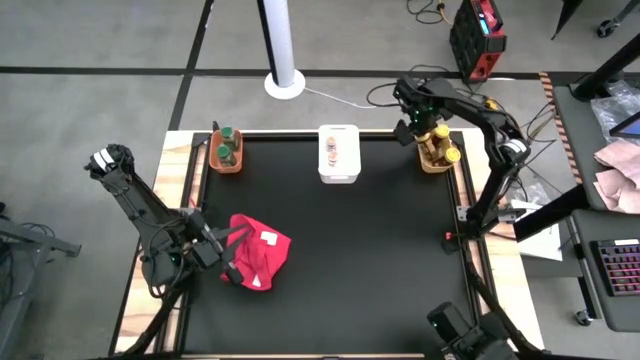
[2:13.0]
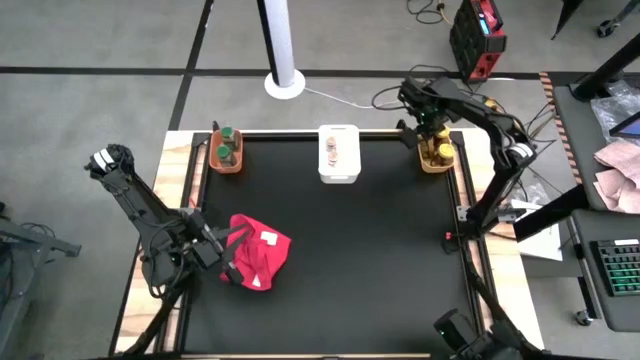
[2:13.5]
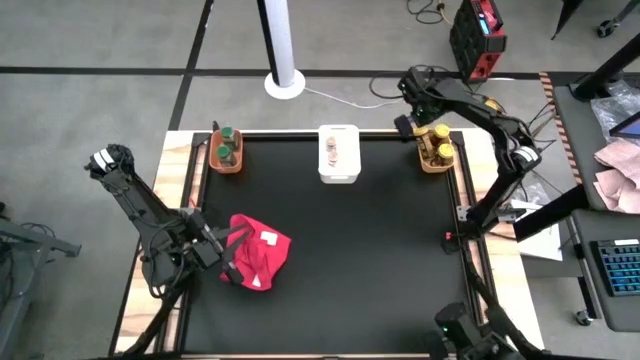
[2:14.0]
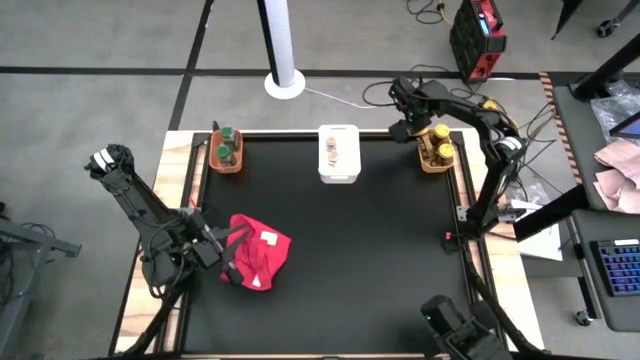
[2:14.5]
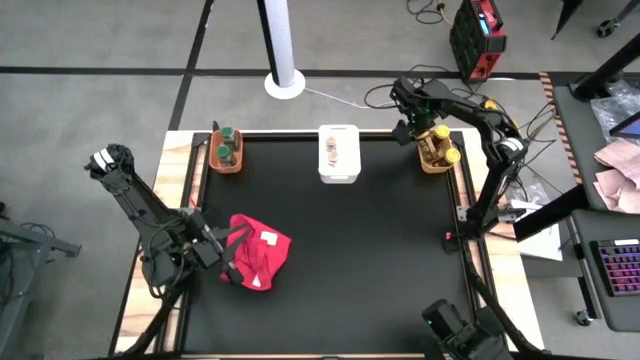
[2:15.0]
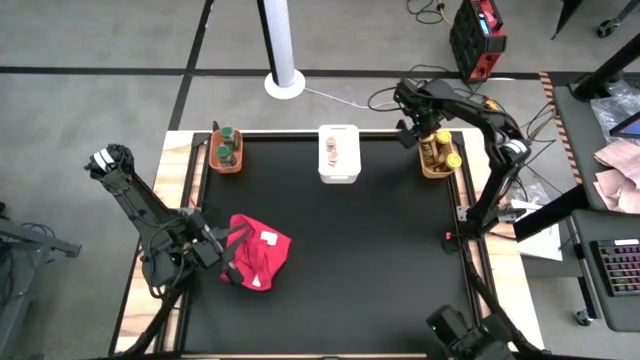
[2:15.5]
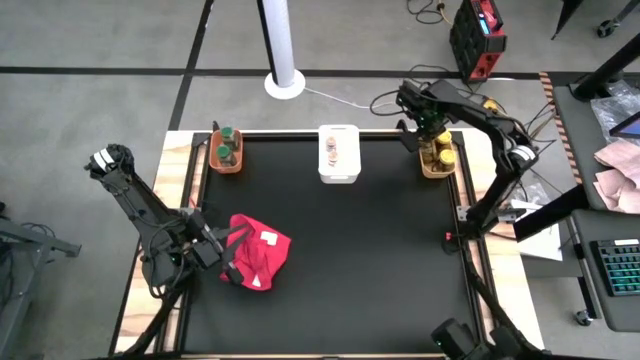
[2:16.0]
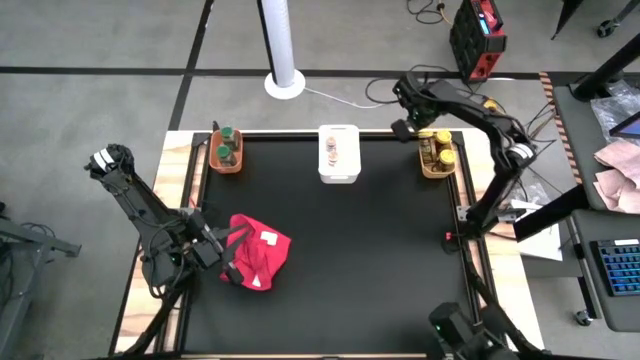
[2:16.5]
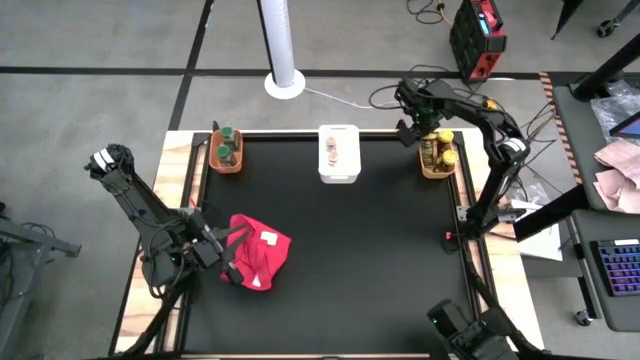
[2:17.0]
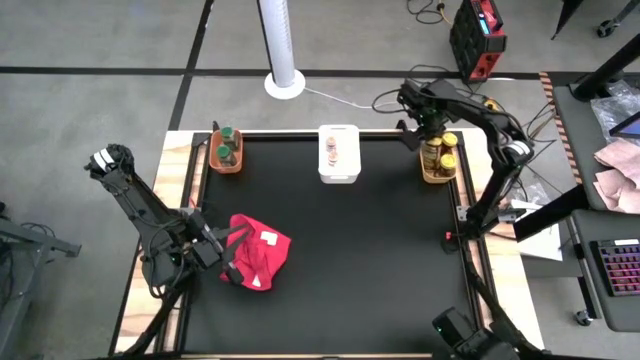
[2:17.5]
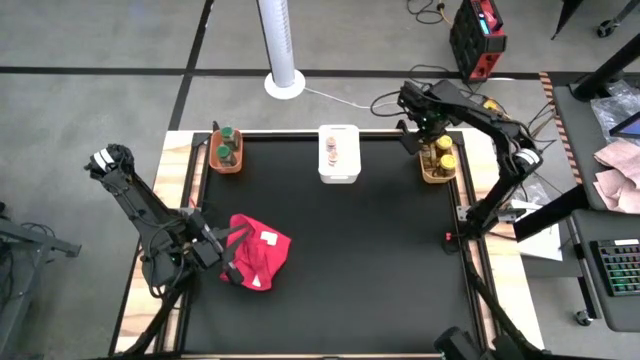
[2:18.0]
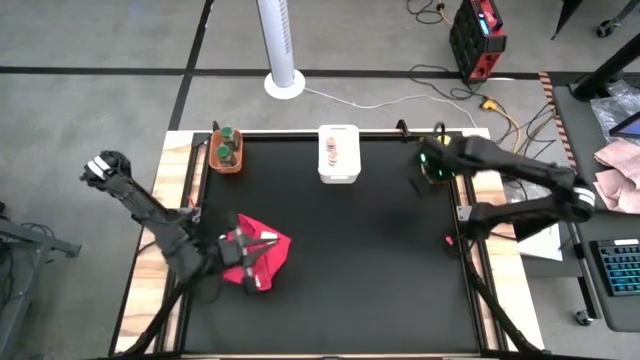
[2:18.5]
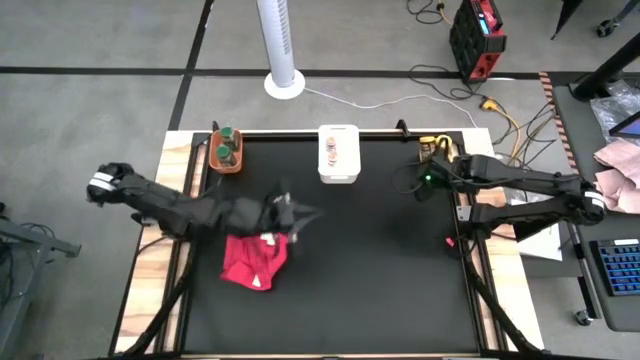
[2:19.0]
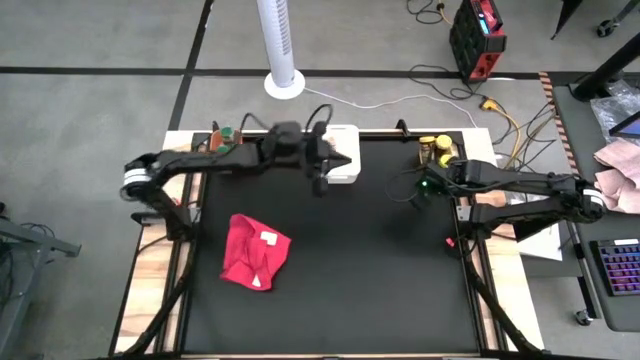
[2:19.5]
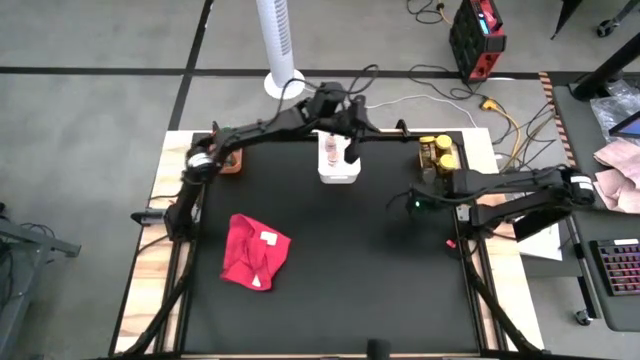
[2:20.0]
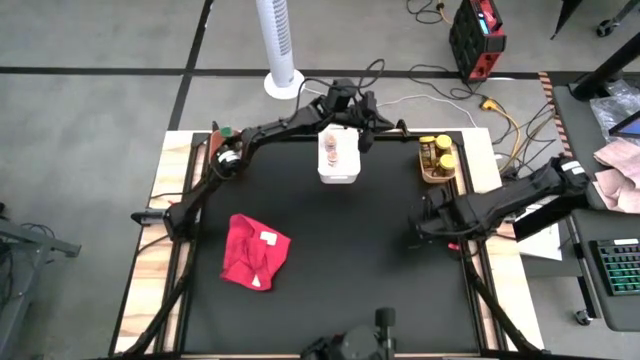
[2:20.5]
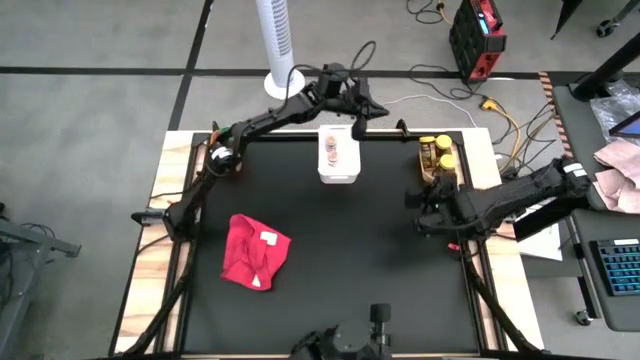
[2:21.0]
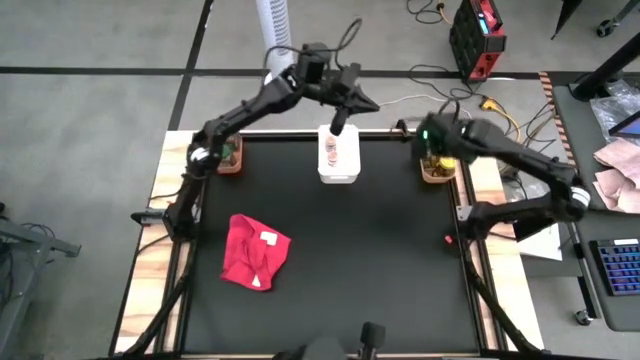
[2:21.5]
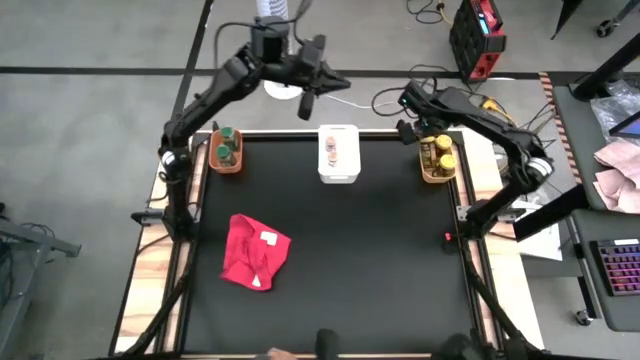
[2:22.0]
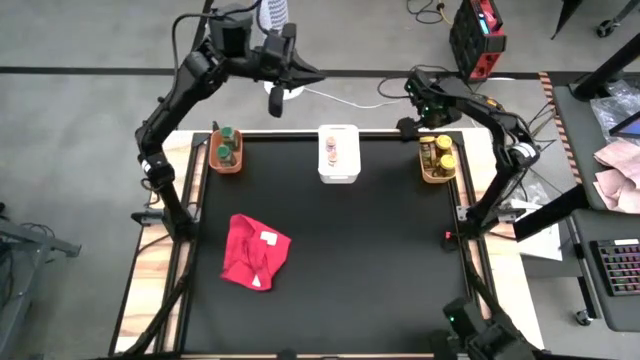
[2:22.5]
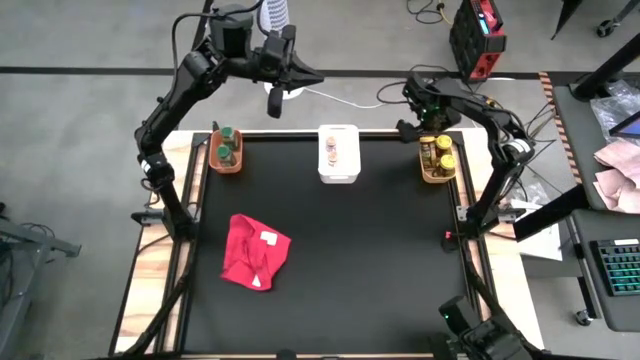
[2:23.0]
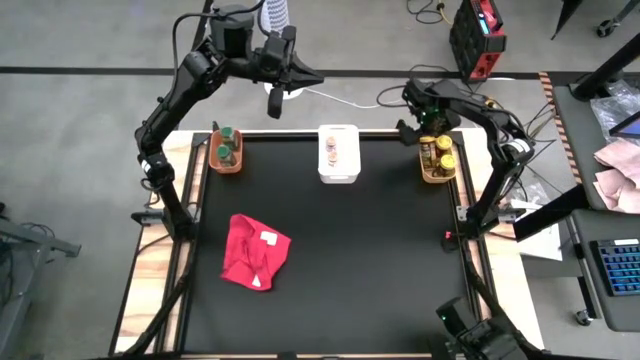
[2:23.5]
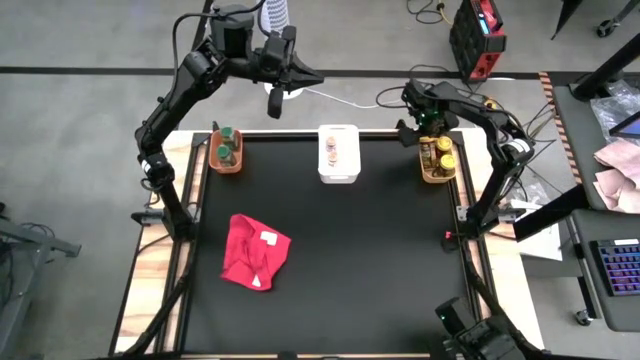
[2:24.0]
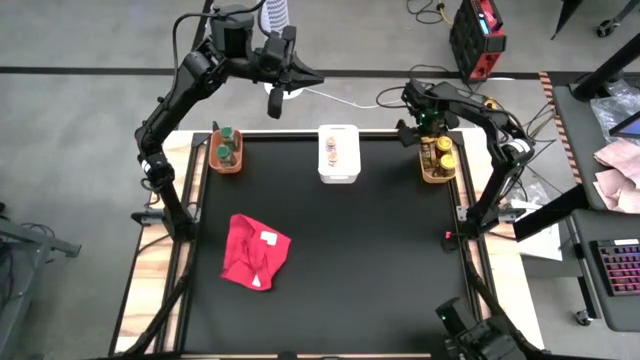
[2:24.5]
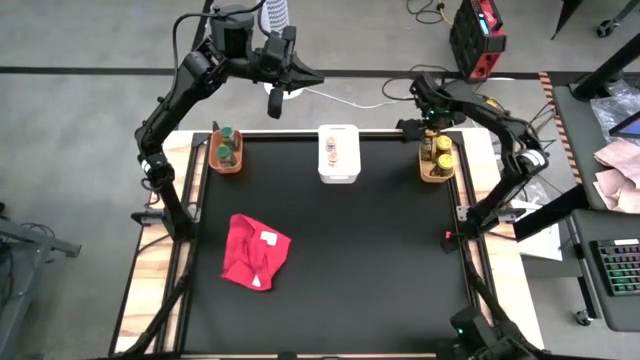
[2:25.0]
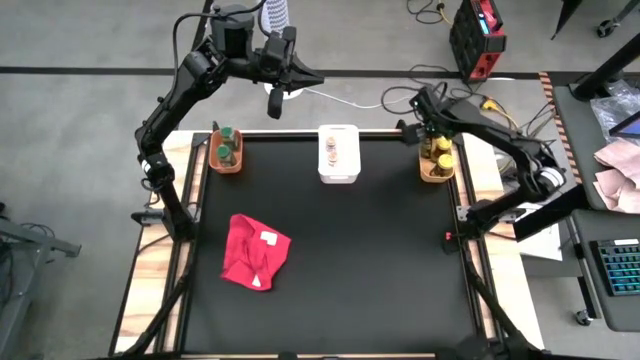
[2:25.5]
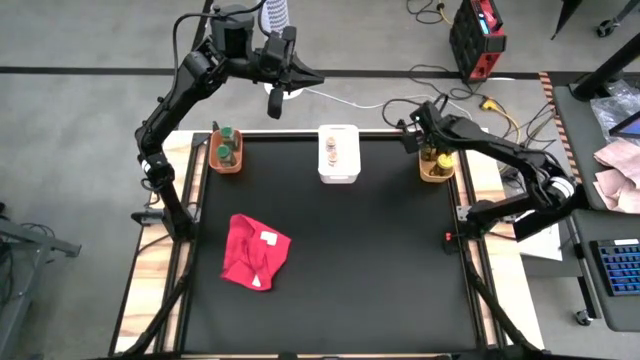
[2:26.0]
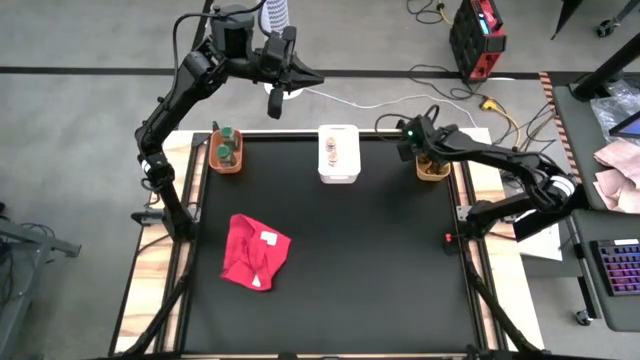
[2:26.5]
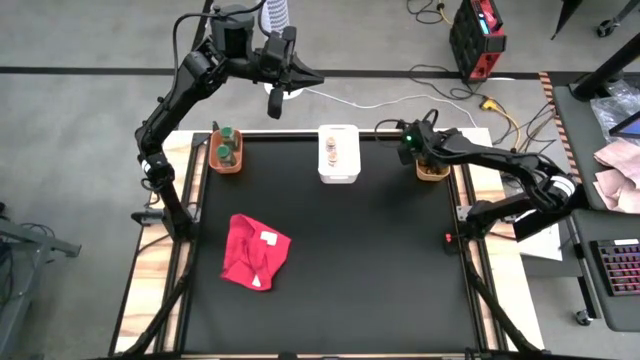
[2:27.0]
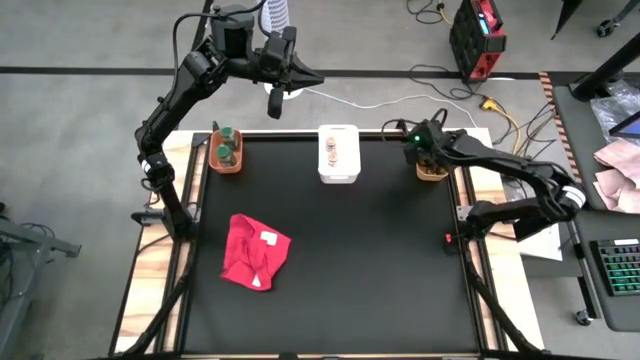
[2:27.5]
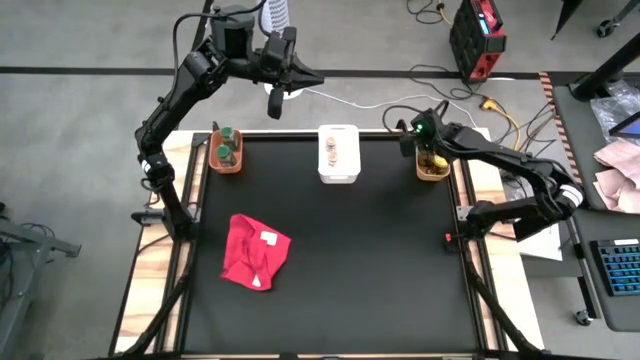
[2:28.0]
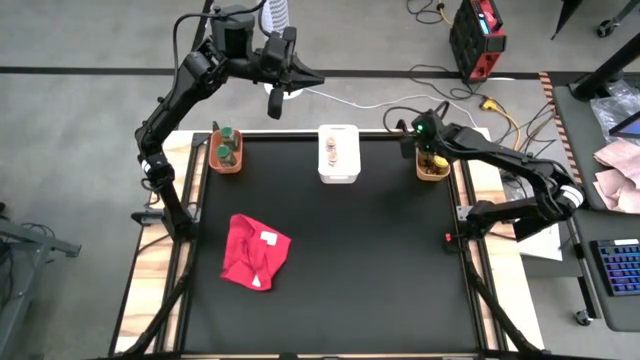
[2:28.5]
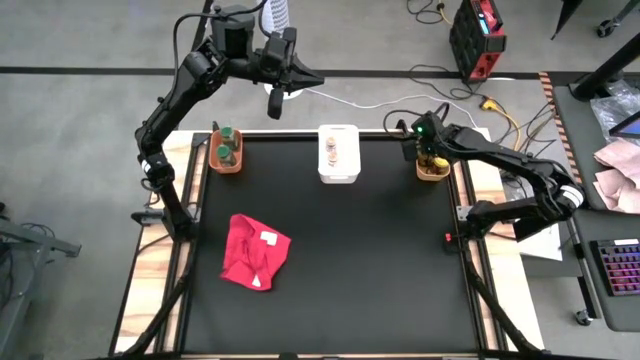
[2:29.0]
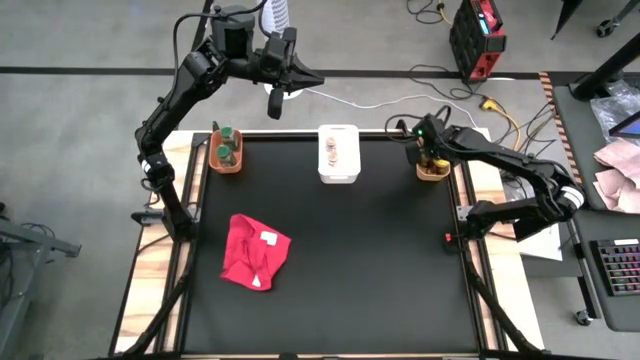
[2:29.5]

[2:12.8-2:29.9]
Task: Sort spices by type
Put the yellow seasoning bottle into the yellow bin

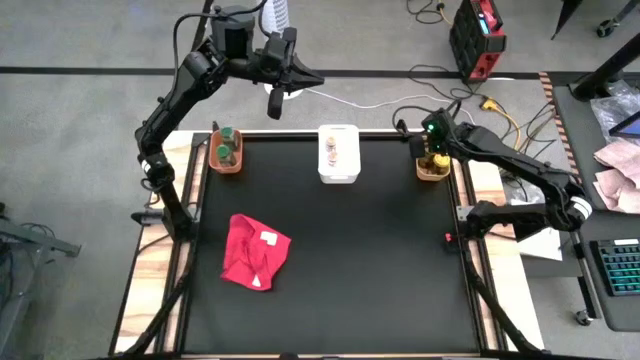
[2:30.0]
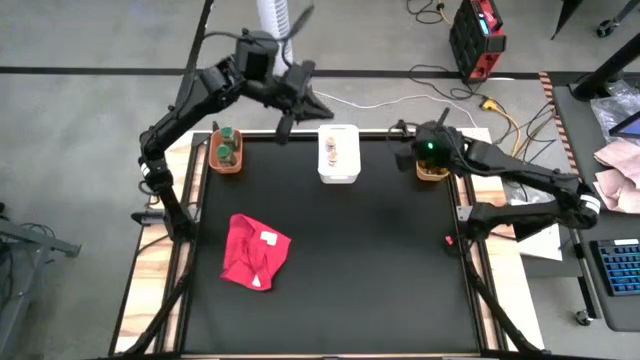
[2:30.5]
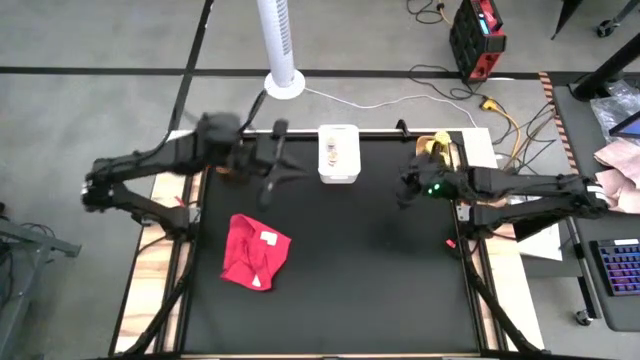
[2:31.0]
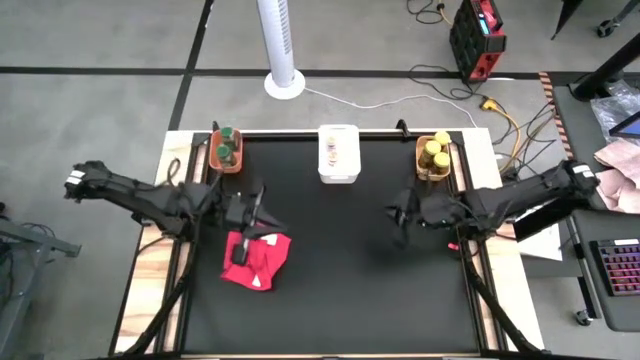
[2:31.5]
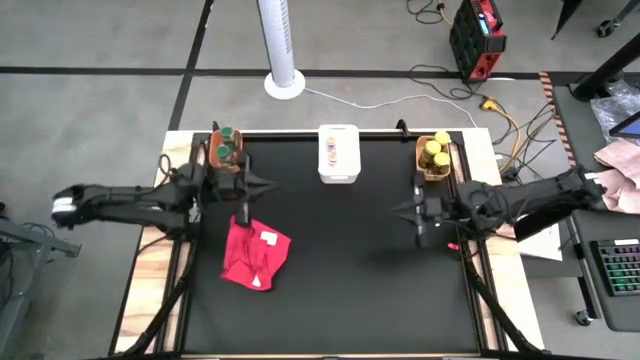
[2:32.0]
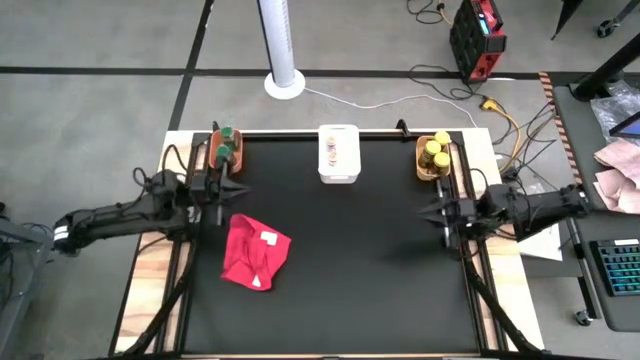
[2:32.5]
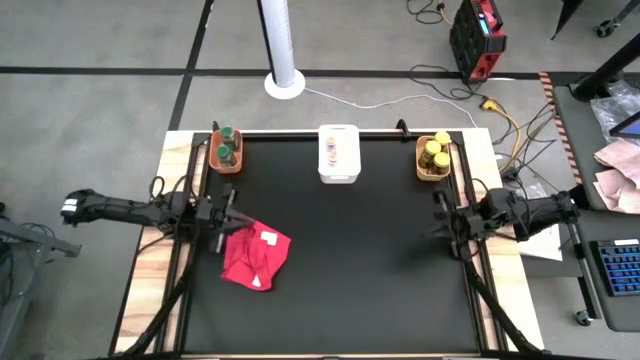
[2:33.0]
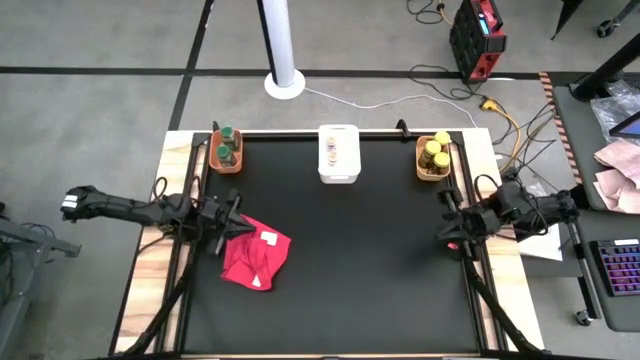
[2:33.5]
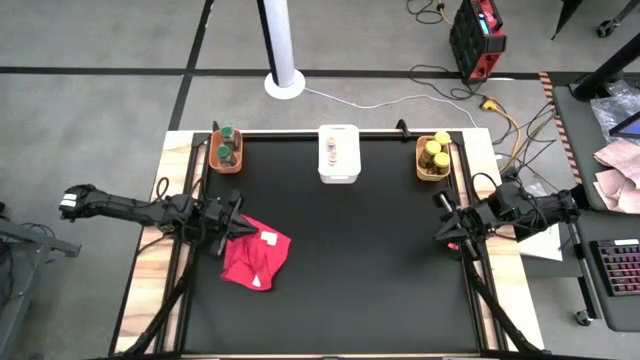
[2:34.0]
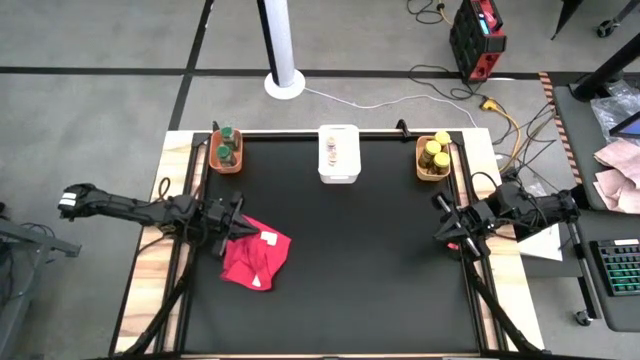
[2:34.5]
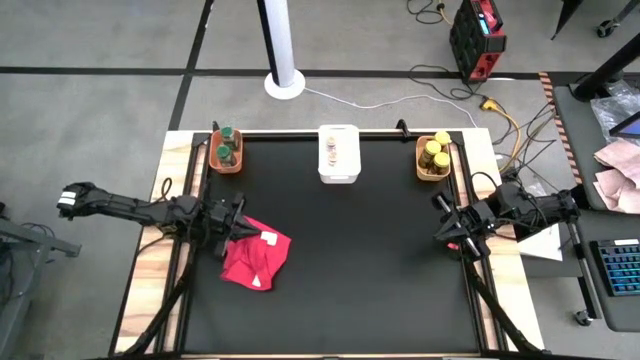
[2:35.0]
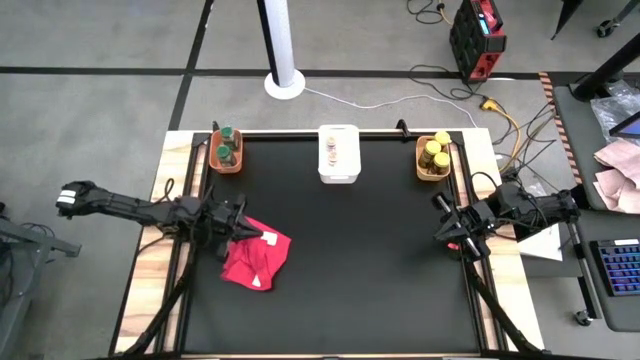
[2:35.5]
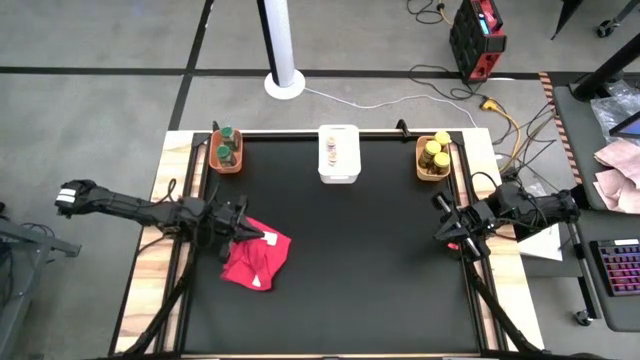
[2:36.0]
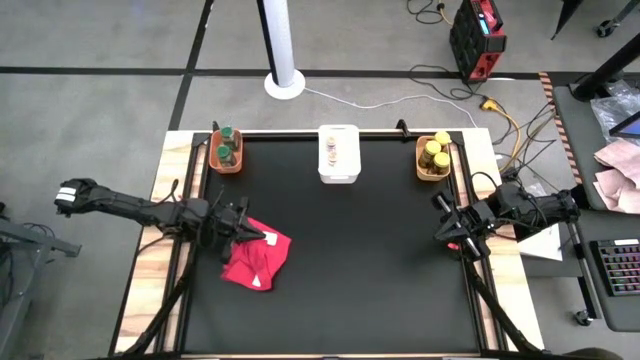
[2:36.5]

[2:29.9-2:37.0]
Return to Home Position
